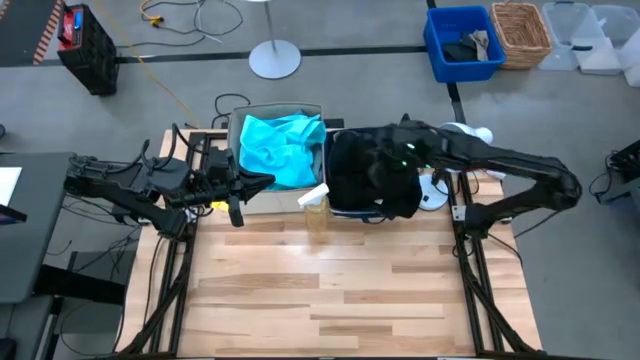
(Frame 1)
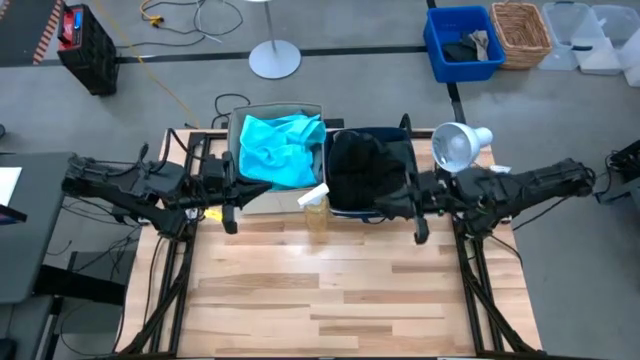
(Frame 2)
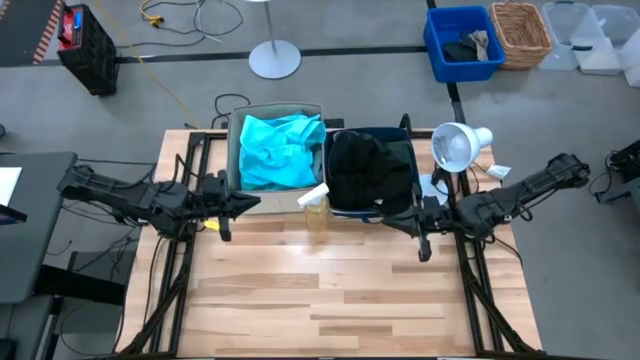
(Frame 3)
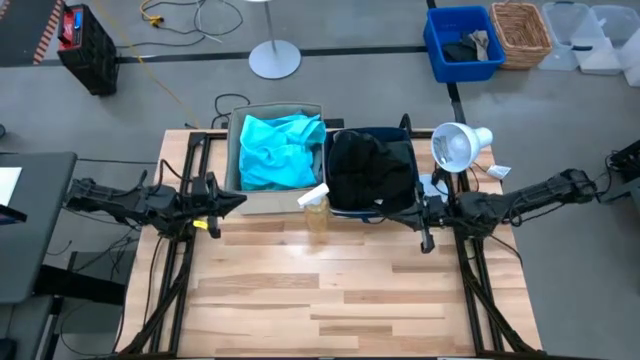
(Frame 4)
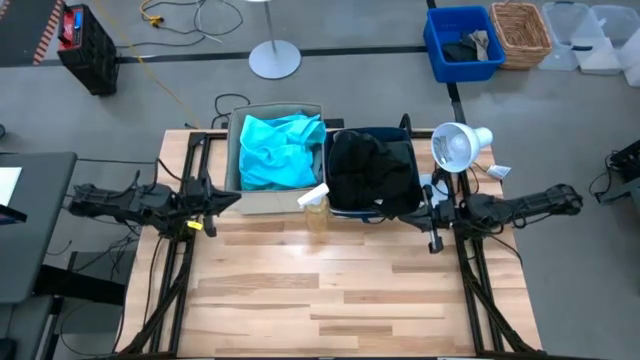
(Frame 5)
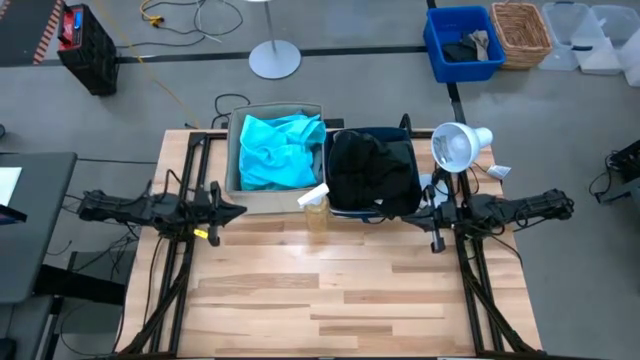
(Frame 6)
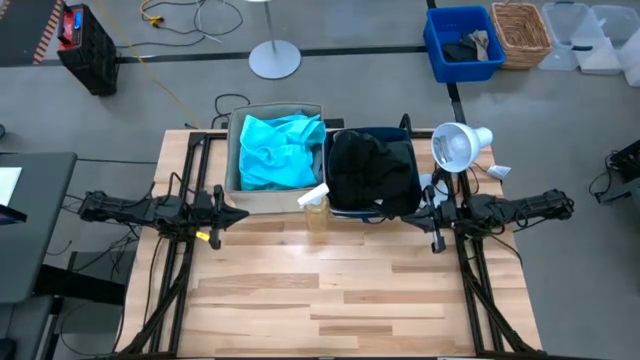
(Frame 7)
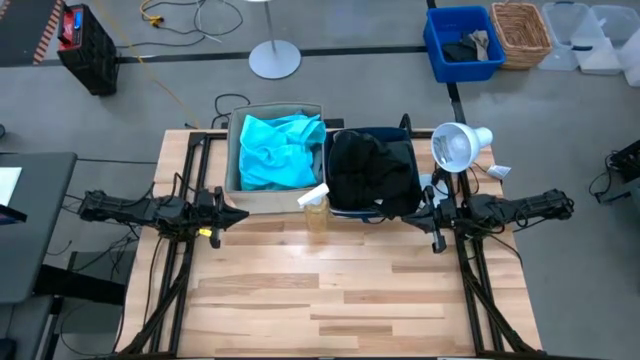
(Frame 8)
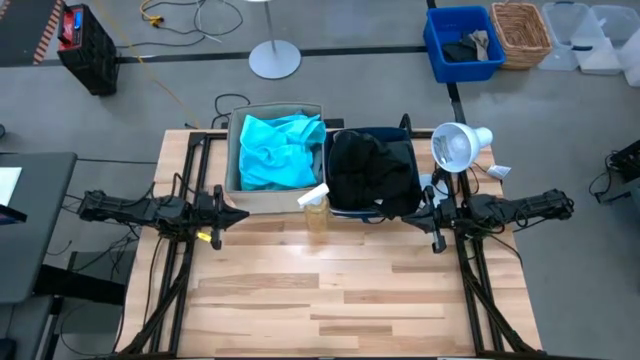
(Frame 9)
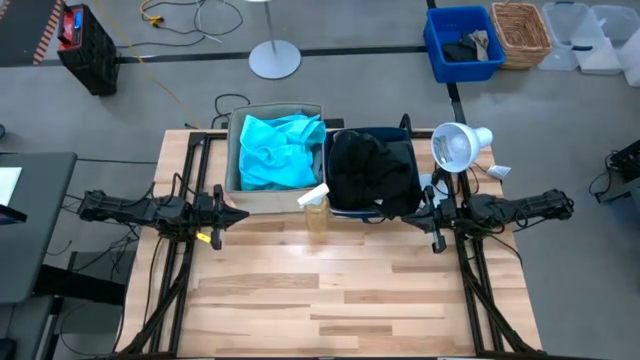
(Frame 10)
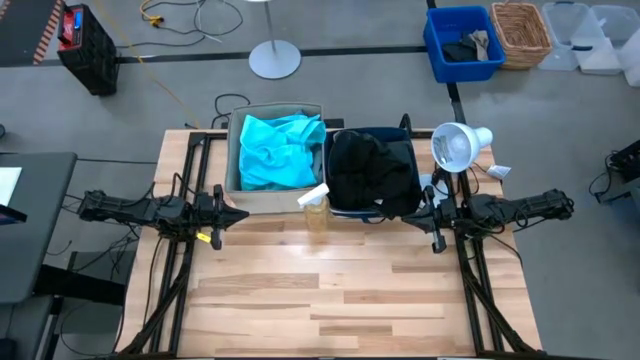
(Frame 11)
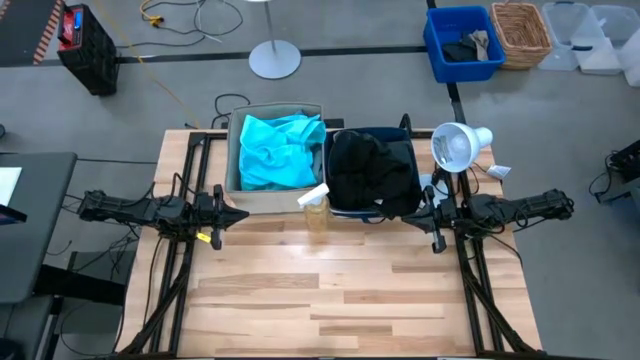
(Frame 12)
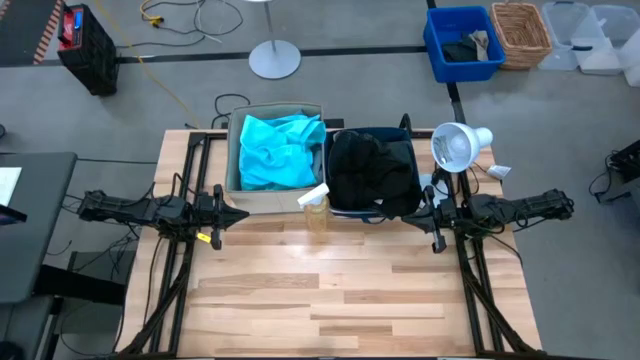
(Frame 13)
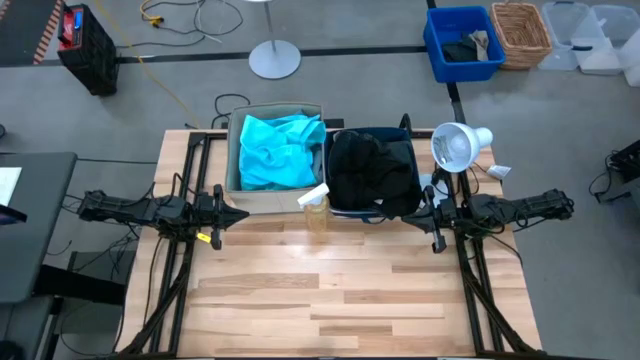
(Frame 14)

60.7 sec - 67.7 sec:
Task: Sort clothes
Return to Home Position

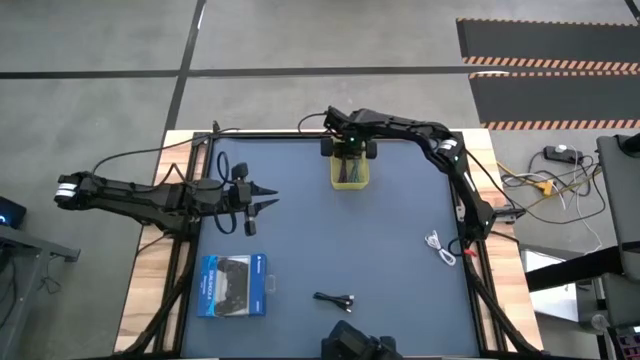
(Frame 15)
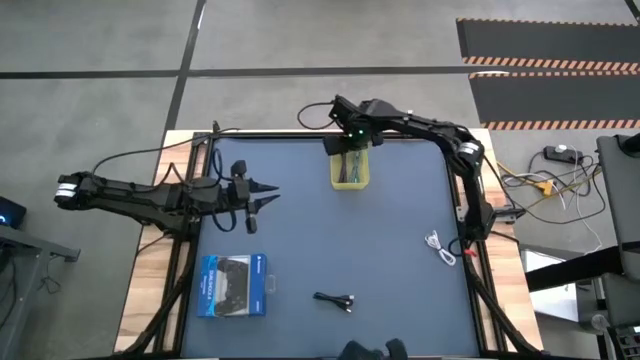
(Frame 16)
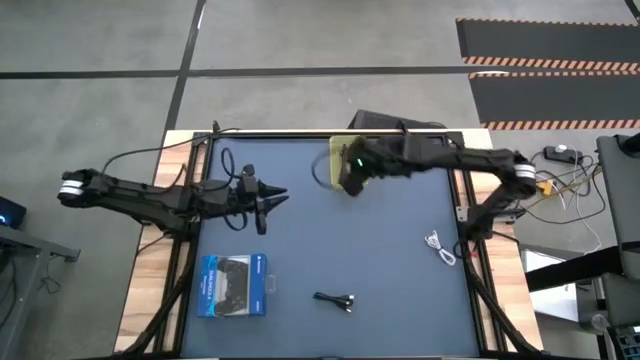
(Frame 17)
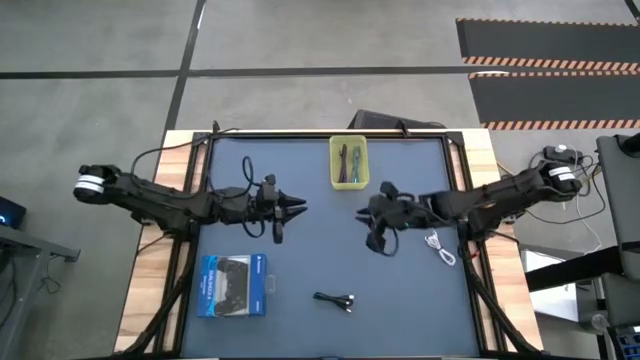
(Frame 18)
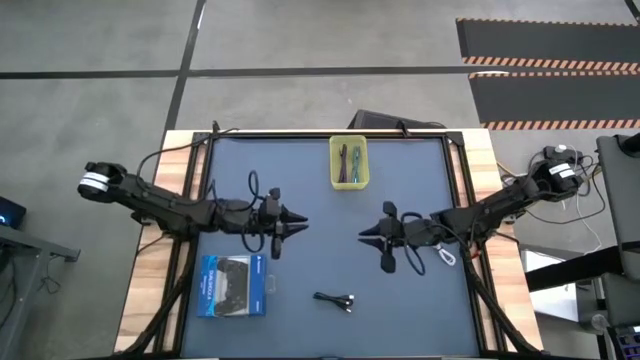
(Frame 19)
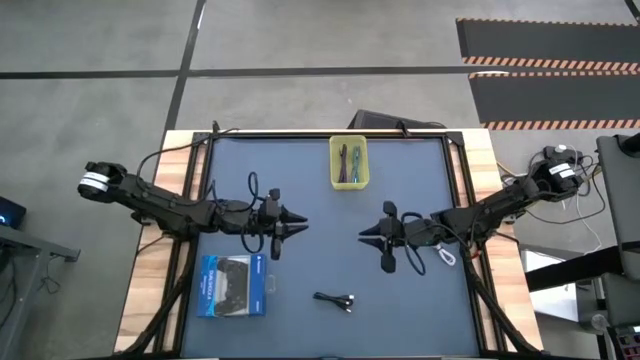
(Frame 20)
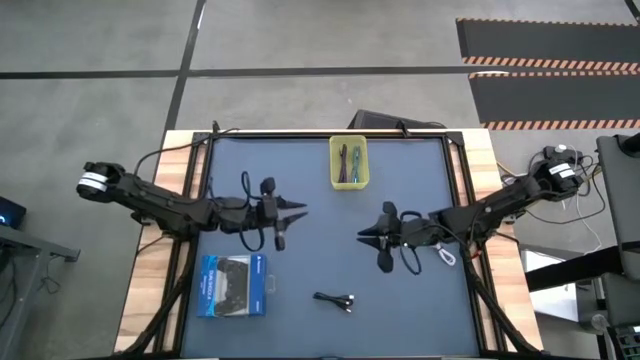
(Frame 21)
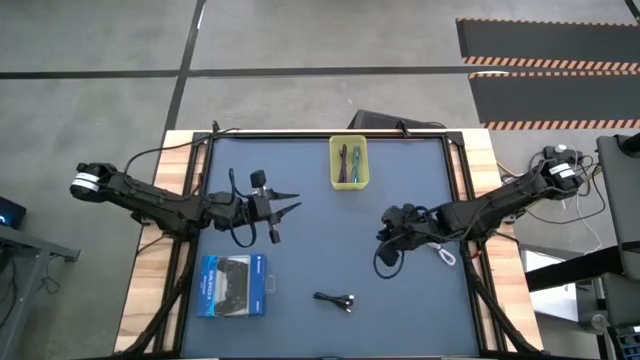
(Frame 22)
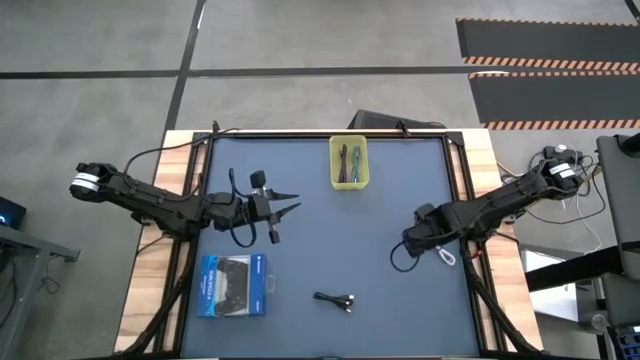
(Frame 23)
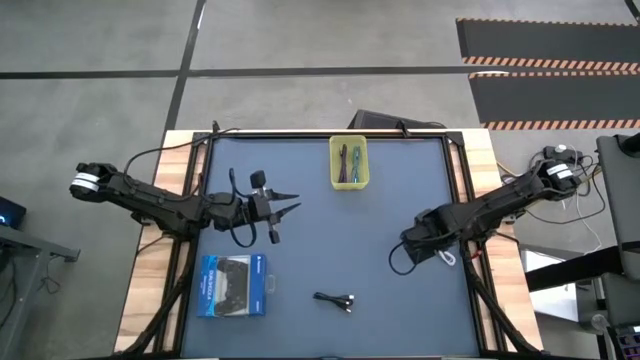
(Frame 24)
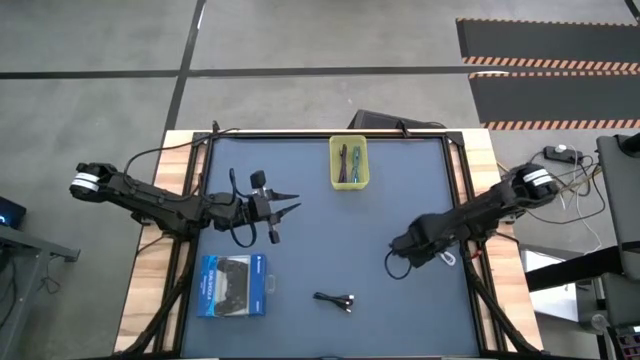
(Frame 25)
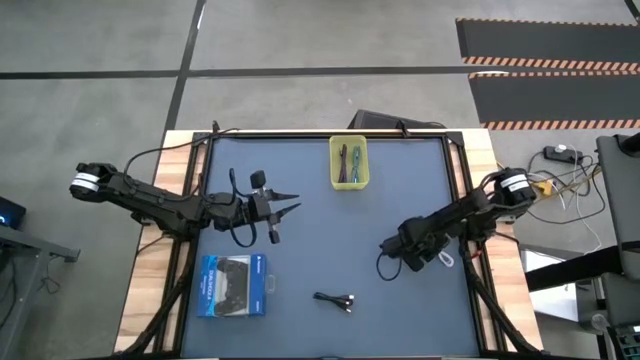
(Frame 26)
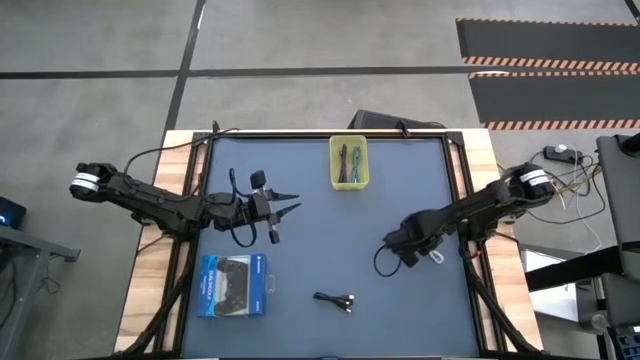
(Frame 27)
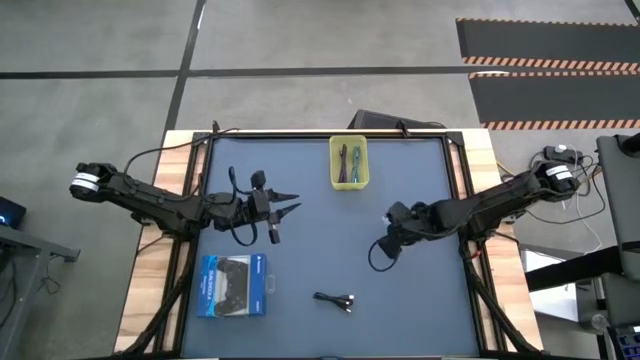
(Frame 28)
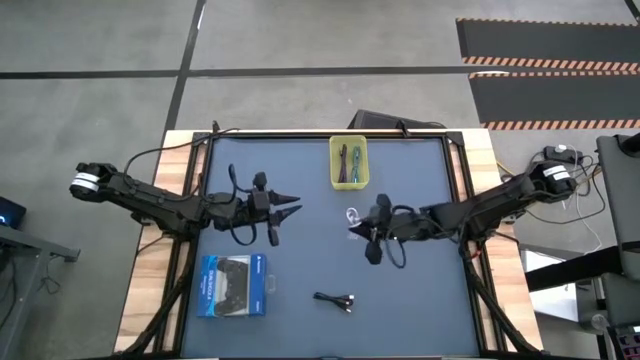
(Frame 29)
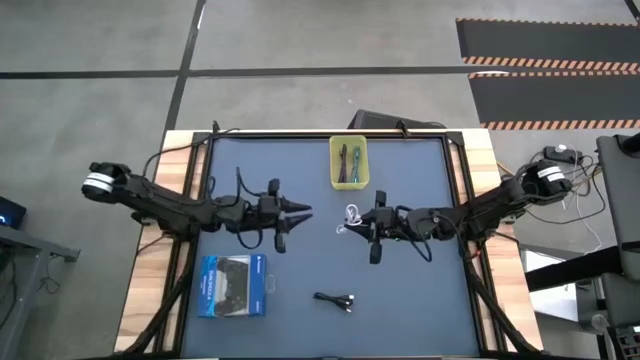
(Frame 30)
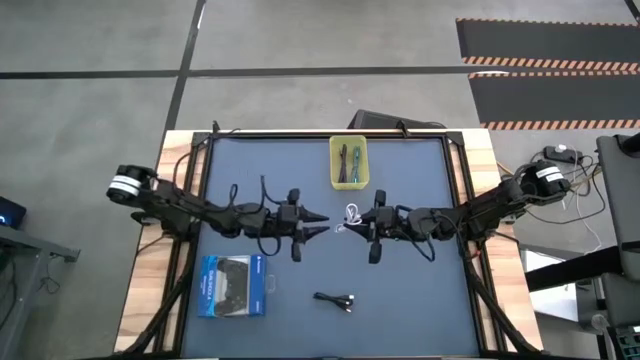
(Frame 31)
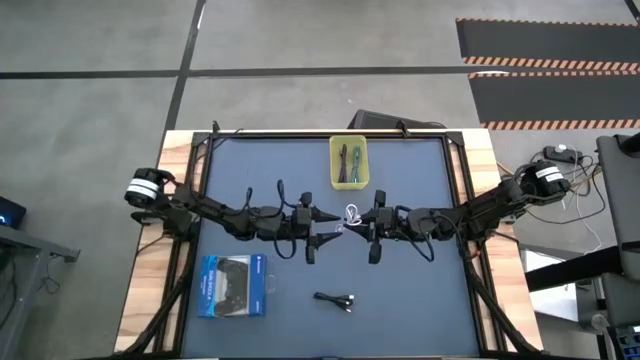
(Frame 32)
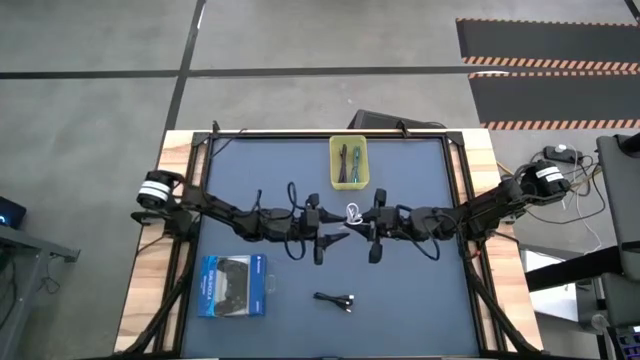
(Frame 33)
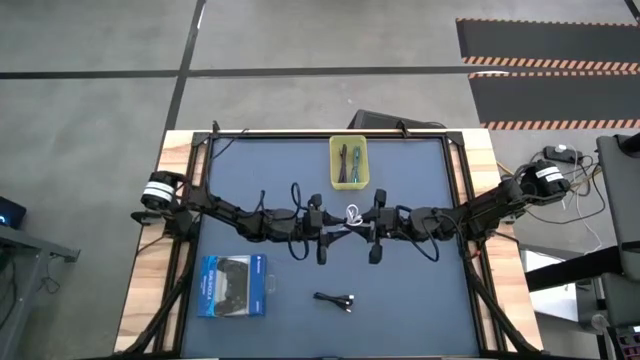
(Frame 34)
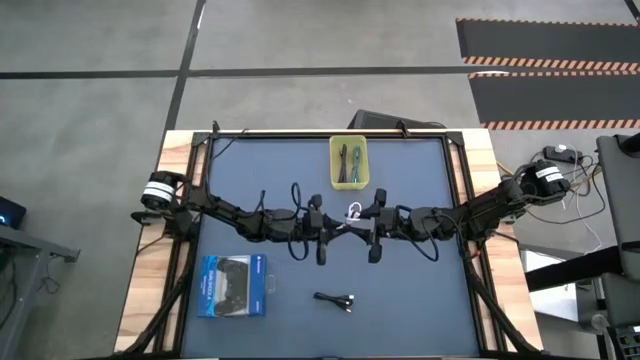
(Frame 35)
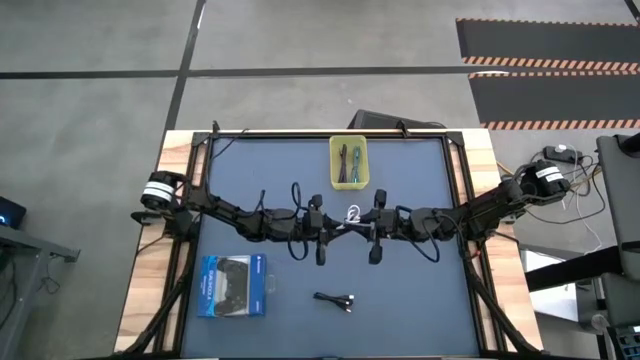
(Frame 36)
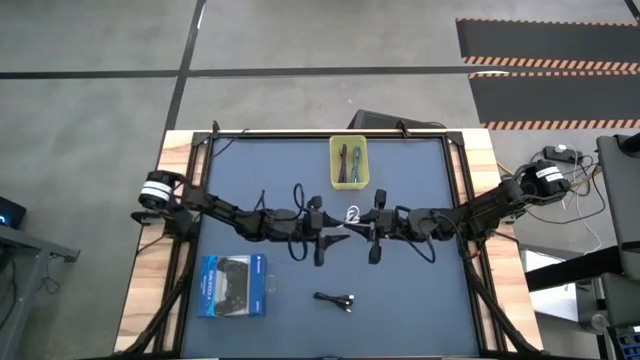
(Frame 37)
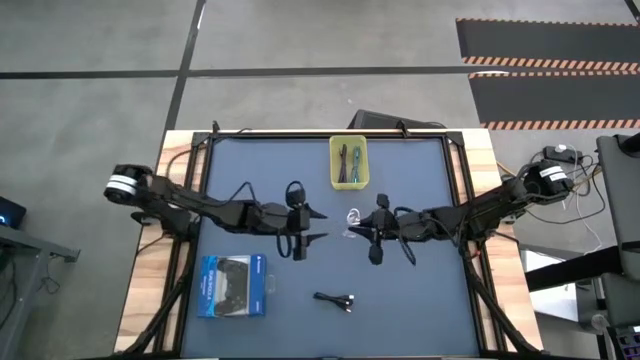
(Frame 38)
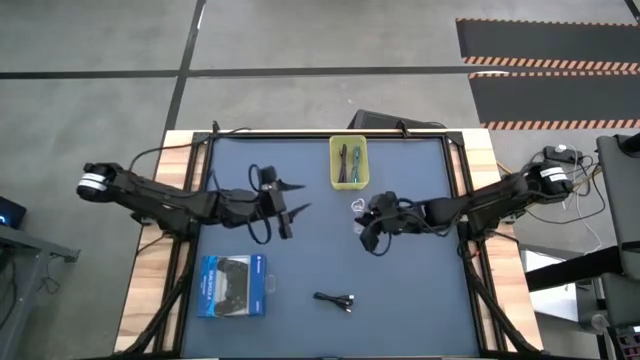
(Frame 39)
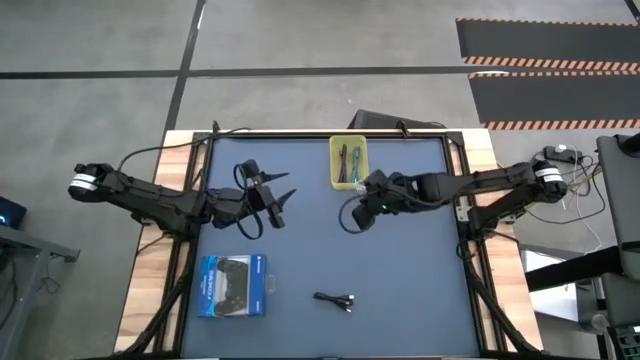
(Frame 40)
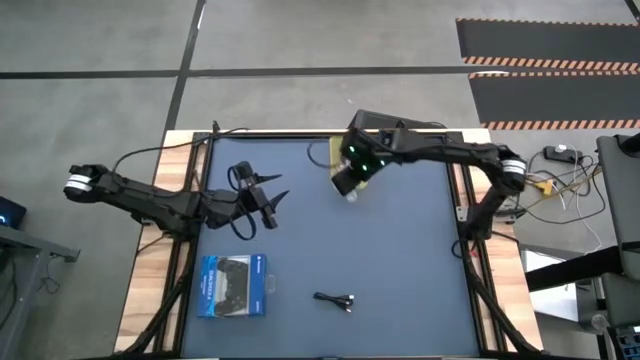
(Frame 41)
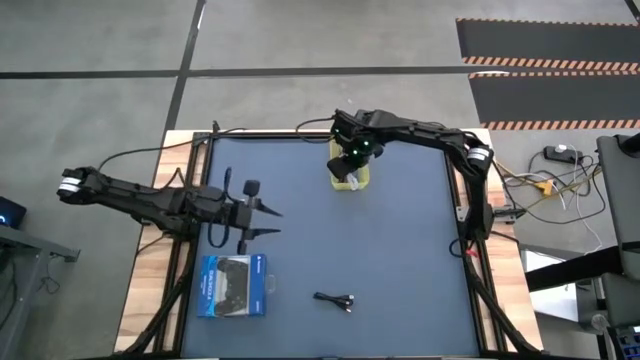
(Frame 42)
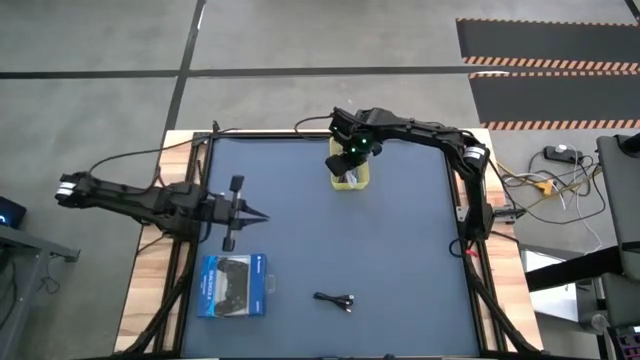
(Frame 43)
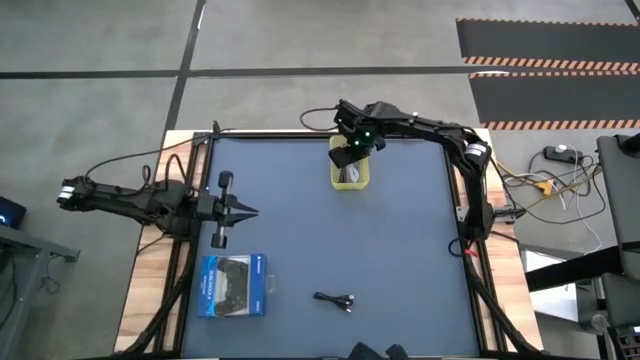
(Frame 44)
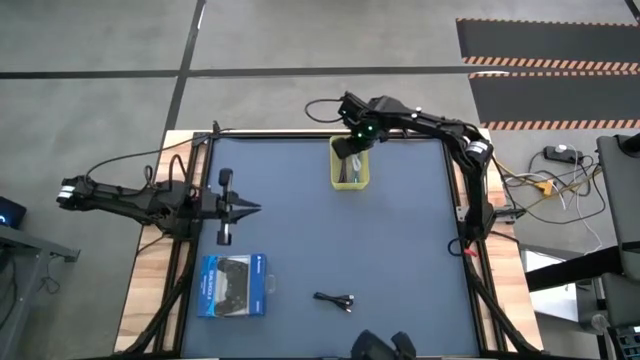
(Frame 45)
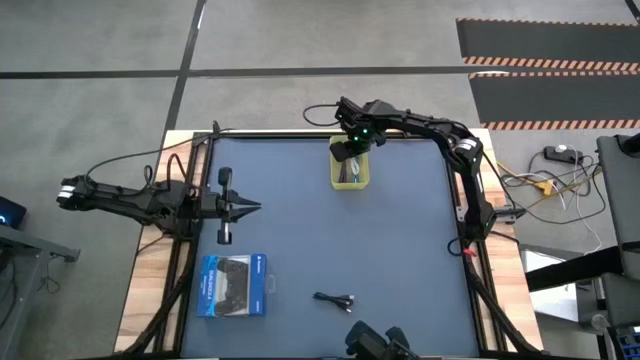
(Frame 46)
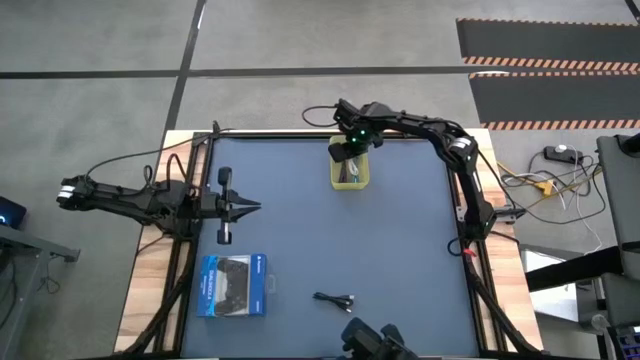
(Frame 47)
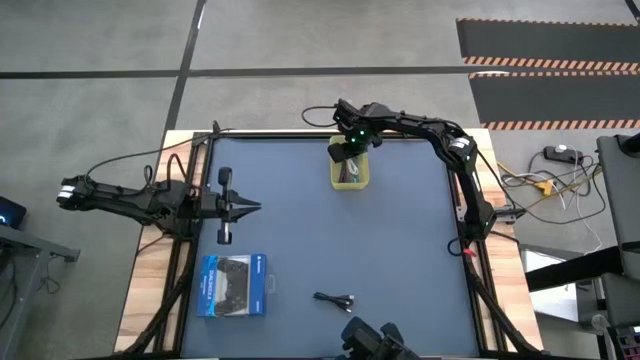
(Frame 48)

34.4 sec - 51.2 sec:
Task: Pick and place USB-C Cables
Put the white charger cable into the yellow bin
